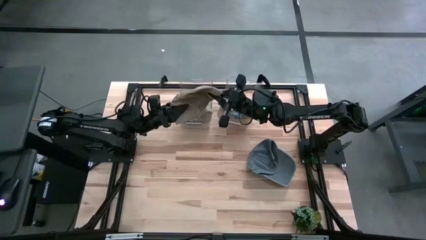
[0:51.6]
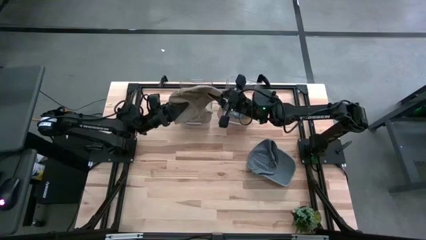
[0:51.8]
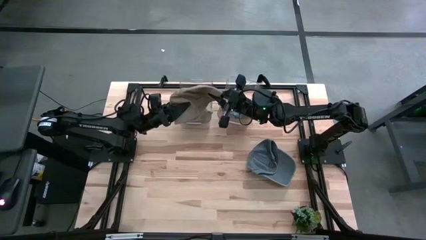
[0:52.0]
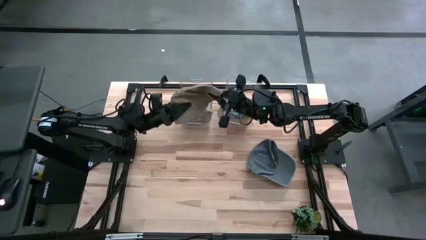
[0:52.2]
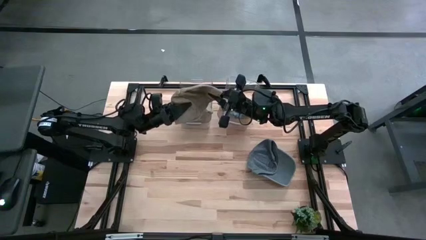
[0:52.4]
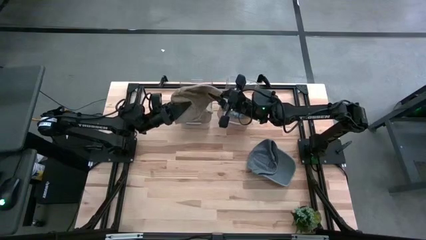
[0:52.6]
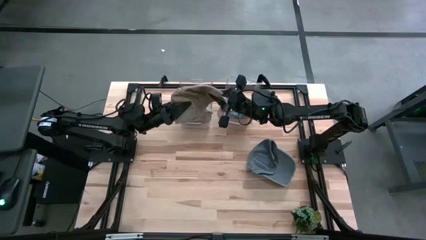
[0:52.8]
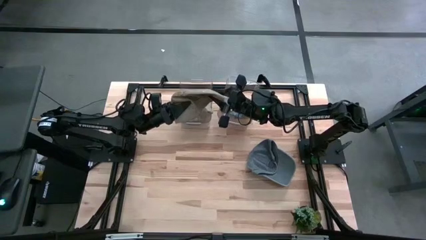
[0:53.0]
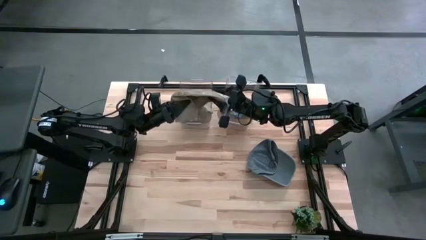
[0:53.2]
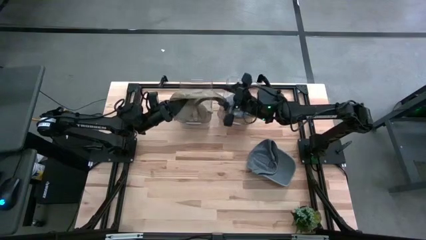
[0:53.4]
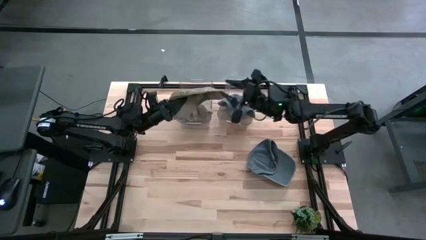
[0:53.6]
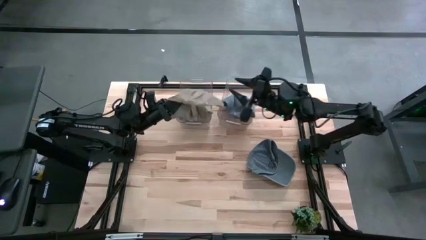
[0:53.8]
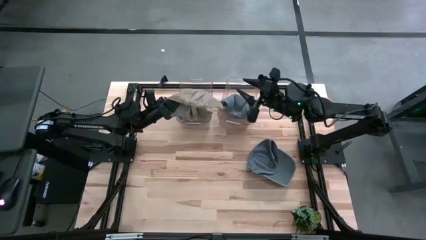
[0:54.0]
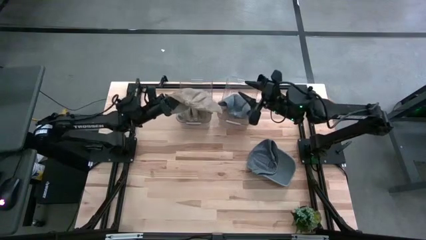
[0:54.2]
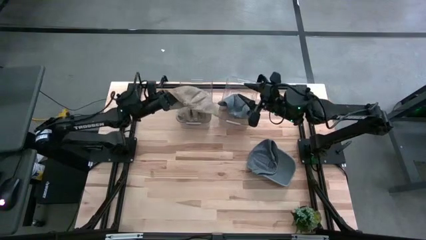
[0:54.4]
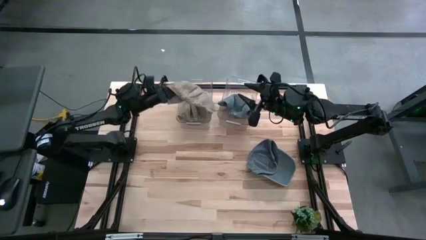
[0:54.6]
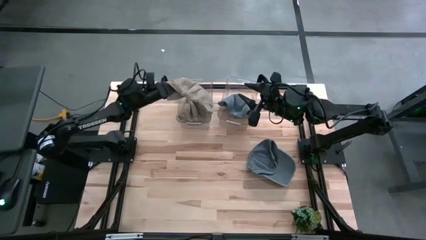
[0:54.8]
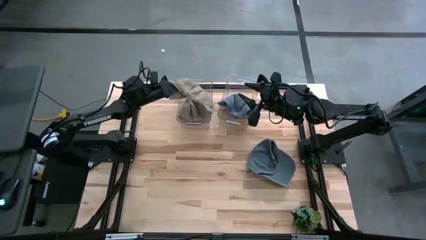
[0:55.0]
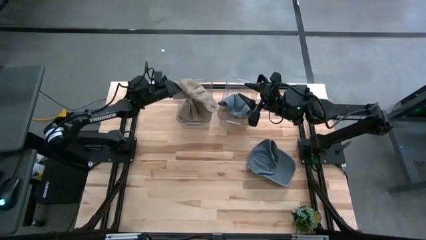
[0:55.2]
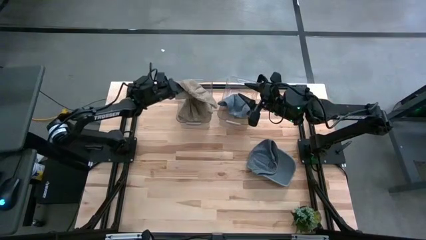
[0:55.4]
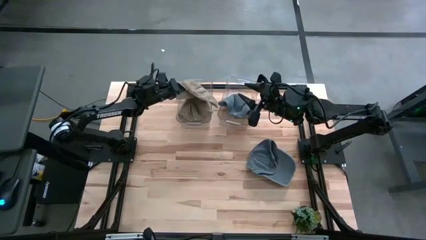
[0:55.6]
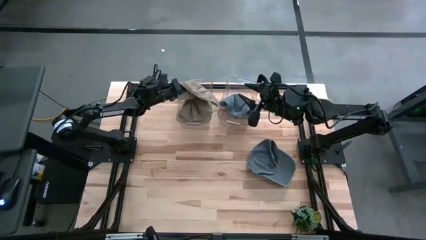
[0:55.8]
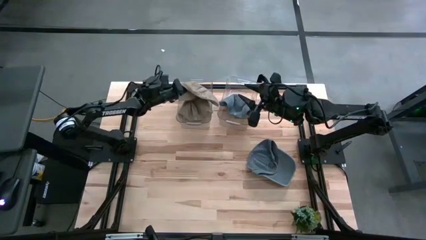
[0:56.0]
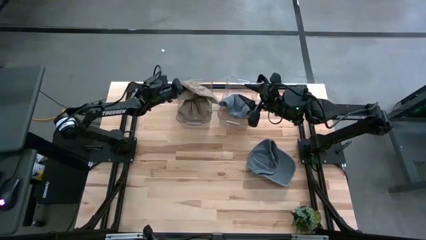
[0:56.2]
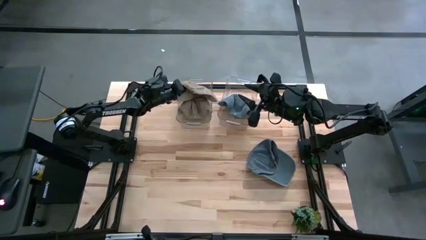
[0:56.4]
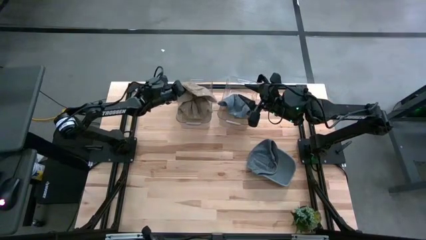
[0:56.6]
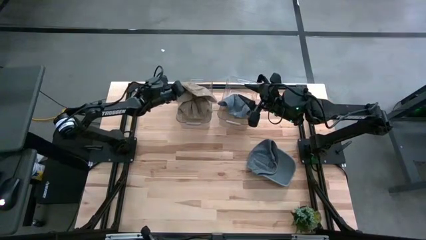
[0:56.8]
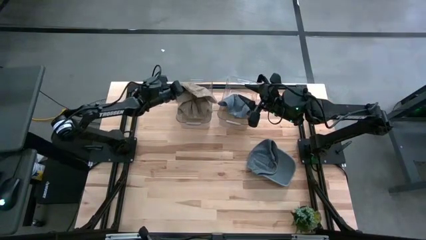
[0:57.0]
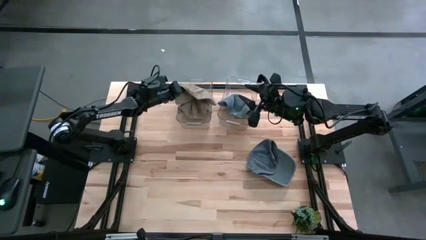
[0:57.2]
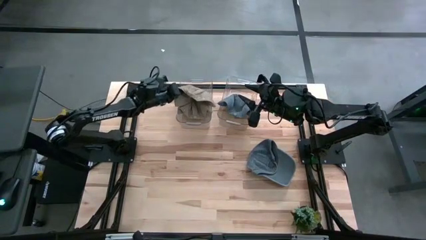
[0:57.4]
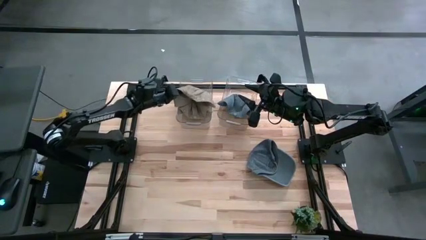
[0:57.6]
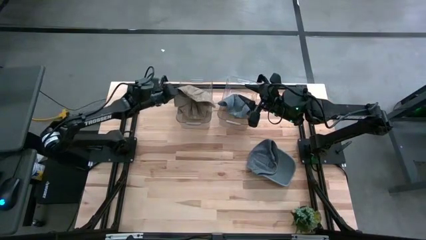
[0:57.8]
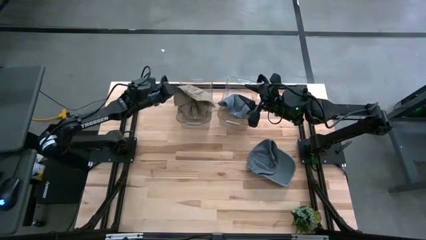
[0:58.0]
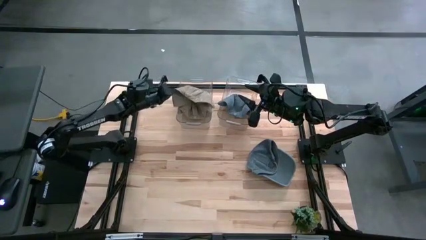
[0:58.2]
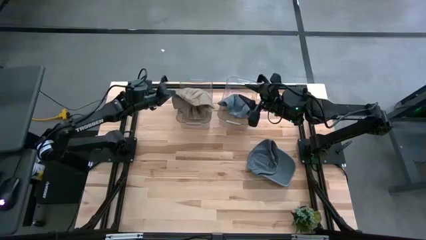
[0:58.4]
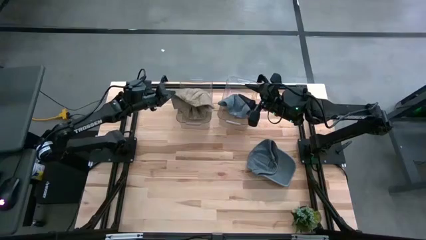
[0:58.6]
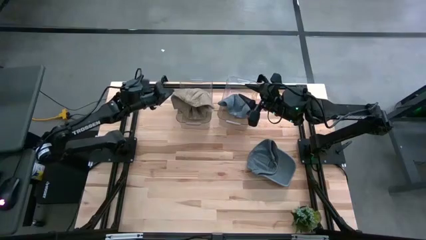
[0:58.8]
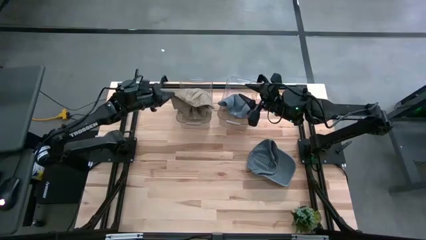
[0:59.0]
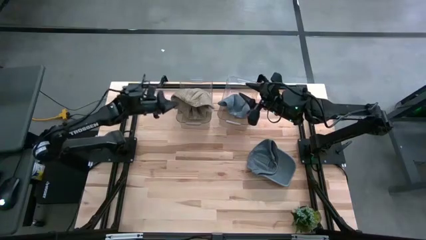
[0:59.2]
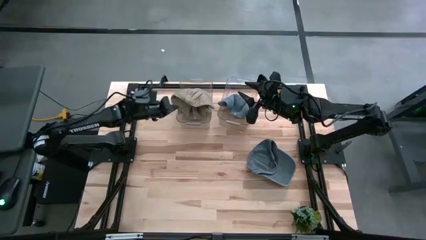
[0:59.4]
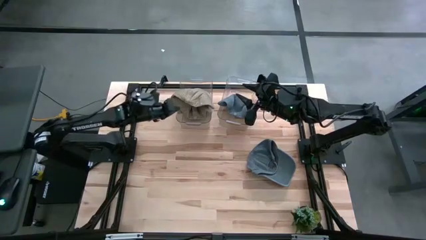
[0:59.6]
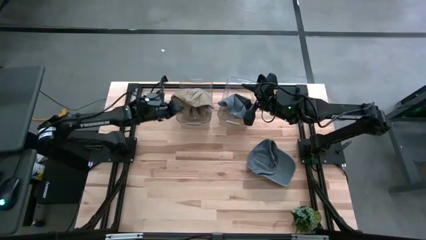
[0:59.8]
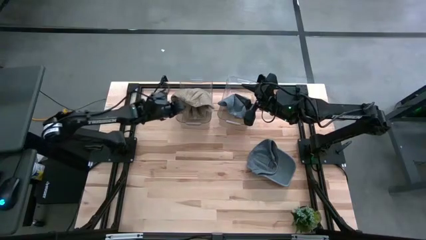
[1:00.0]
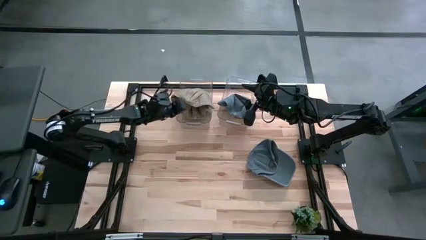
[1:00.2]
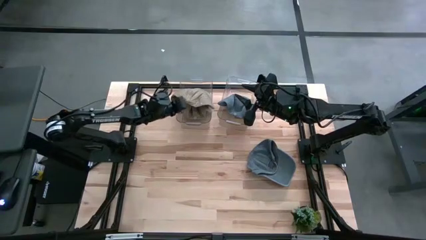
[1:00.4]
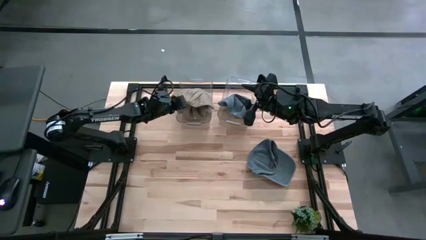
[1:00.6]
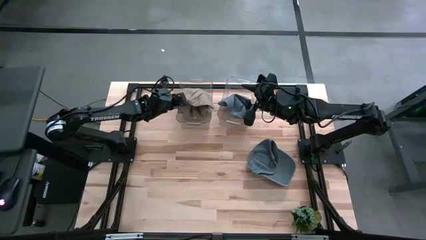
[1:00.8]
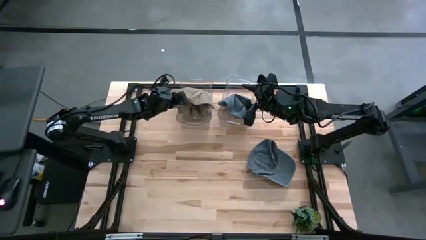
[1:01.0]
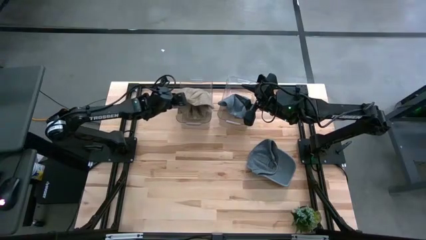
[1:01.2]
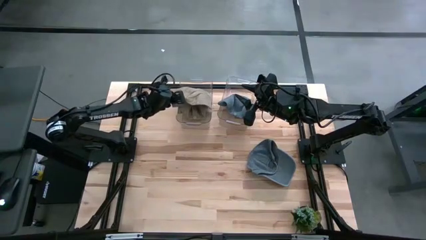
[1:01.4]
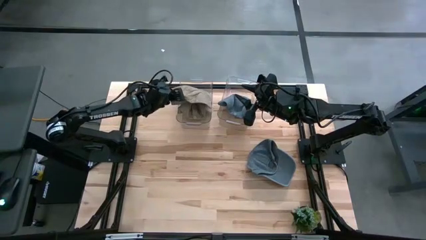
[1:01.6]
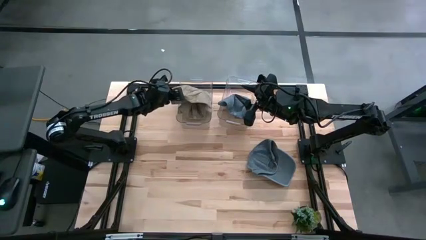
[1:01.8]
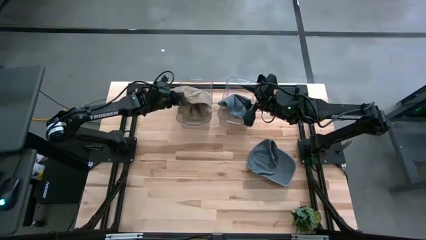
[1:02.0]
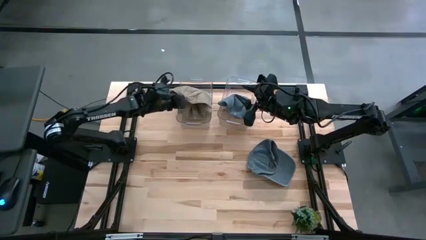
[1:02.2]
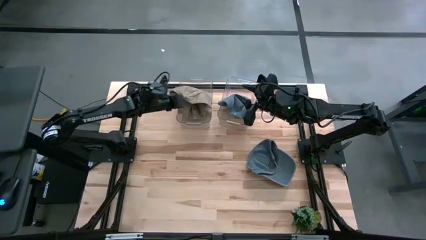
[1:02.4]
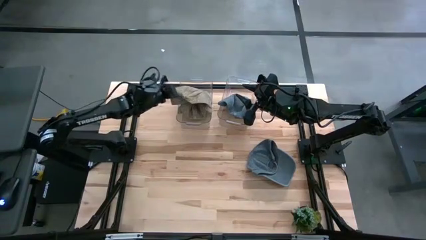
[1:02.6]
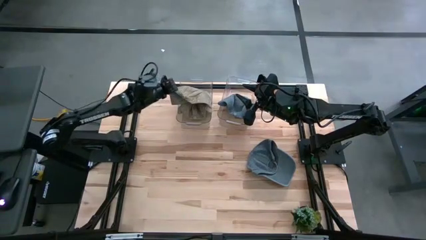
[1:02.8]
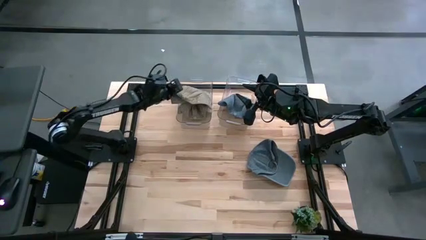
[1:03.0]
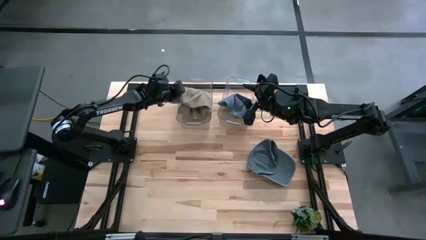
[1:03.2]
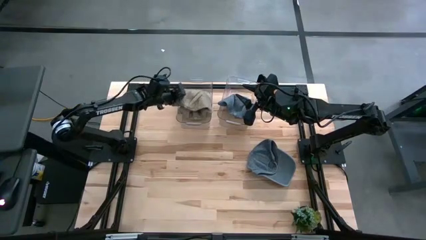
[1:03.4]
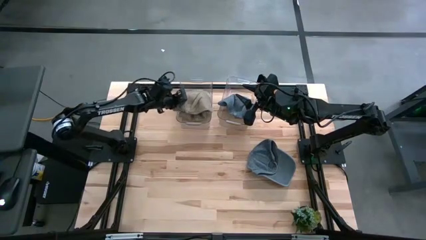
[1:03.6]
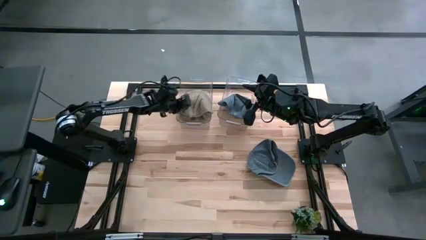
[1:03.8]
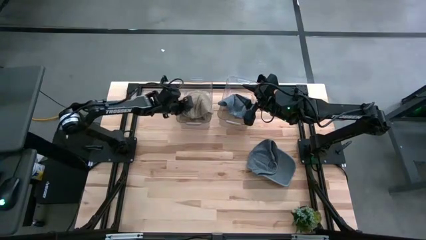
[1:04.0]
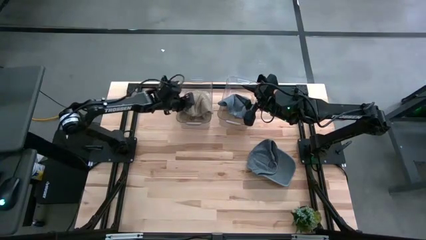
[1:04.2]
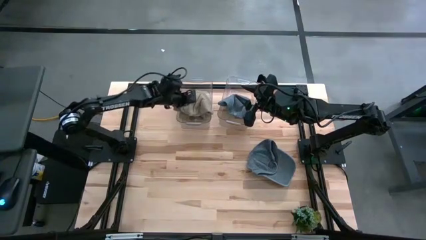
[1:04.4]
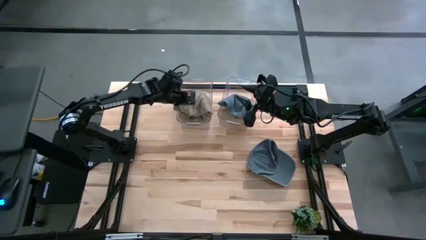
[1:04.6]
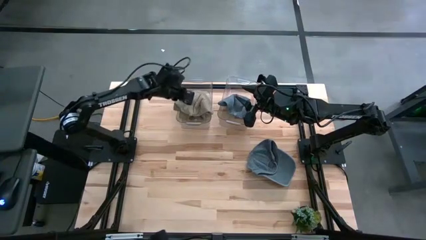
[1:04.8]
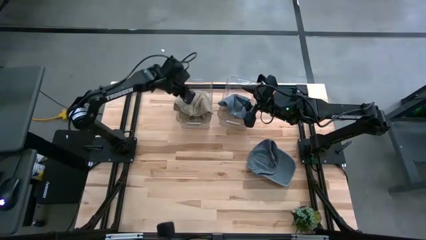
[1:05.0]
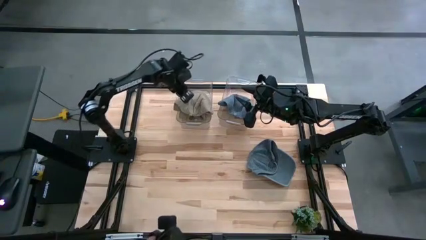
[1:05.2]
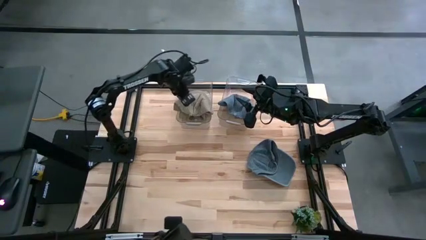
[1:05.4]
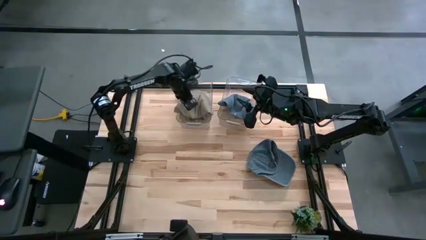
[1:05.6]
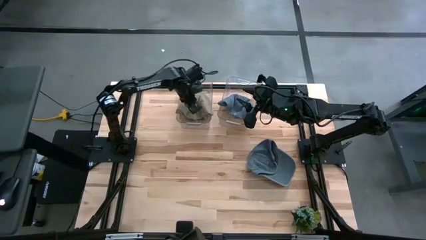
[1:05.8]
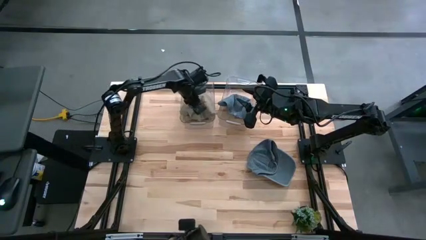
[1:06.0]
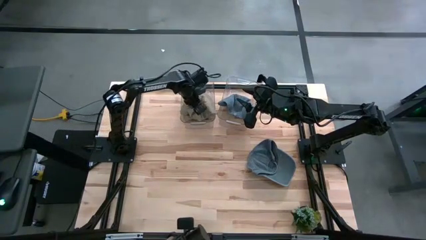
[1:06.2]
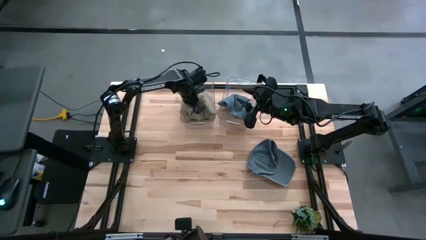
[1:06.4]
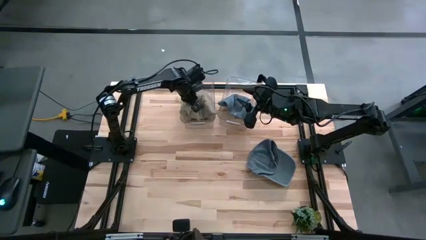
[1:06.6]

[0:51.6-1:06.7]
Task: Pick & Place hat
Put the brown cap into the left transparent bin
